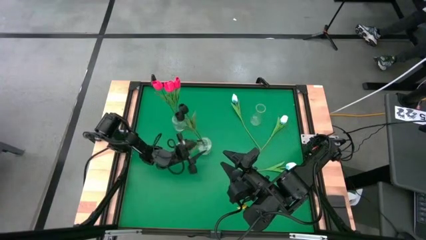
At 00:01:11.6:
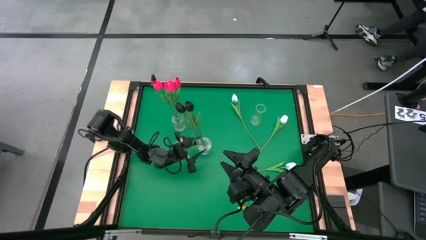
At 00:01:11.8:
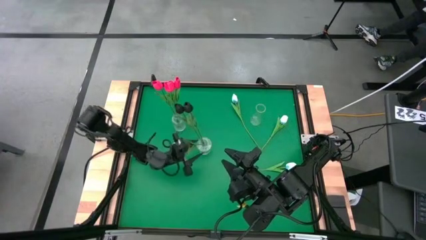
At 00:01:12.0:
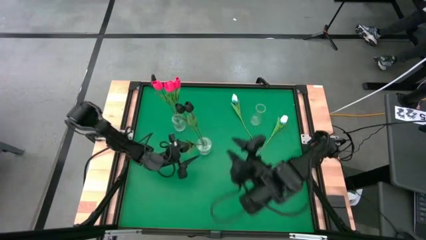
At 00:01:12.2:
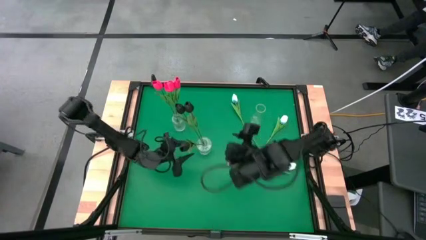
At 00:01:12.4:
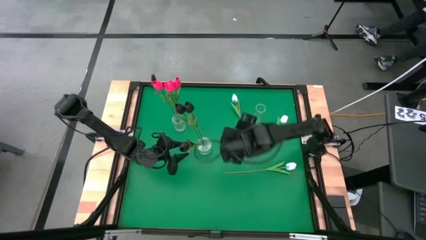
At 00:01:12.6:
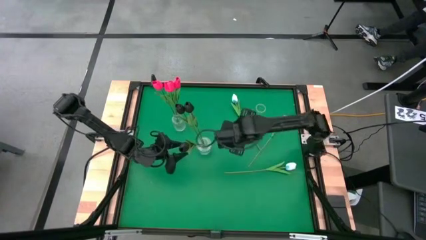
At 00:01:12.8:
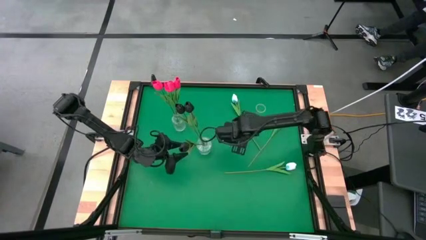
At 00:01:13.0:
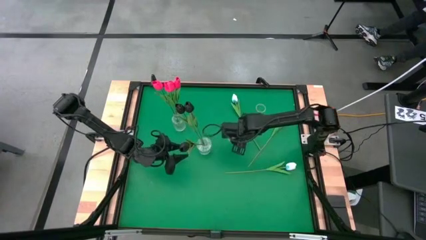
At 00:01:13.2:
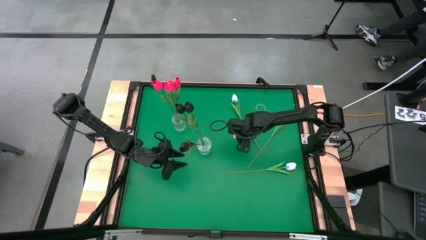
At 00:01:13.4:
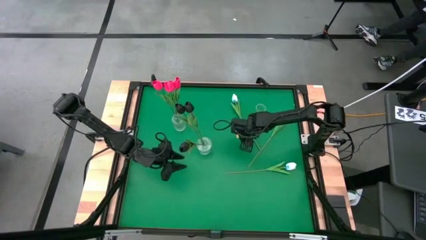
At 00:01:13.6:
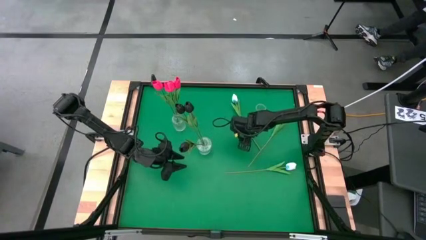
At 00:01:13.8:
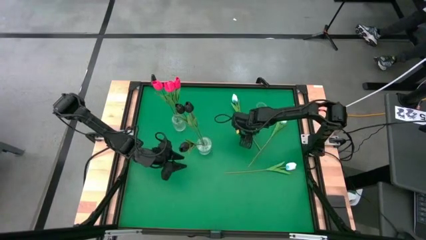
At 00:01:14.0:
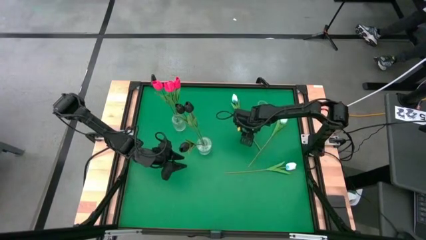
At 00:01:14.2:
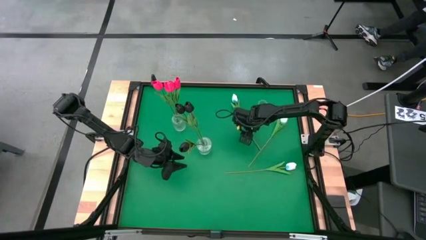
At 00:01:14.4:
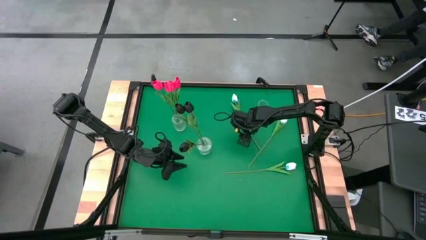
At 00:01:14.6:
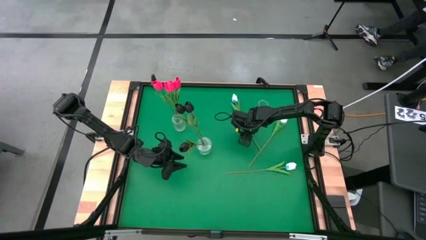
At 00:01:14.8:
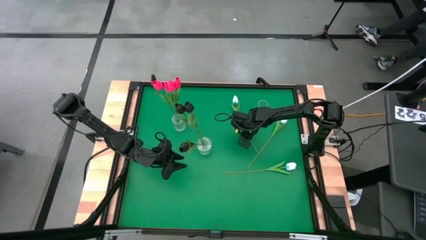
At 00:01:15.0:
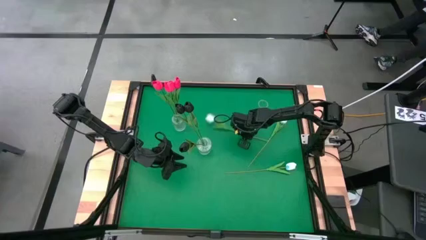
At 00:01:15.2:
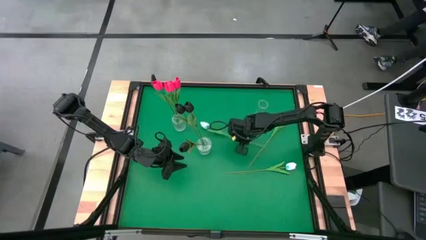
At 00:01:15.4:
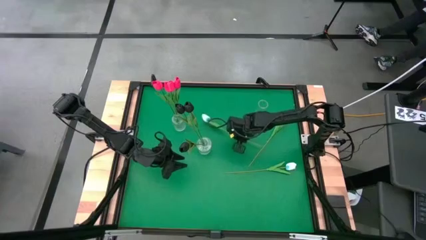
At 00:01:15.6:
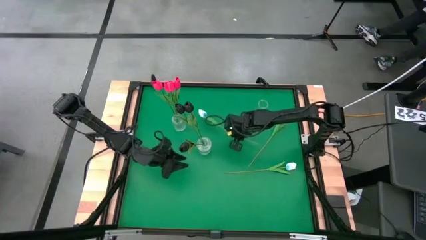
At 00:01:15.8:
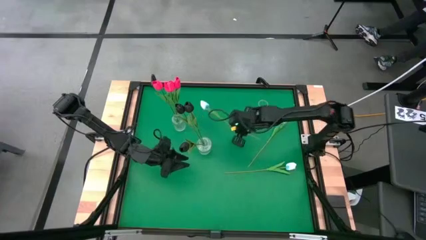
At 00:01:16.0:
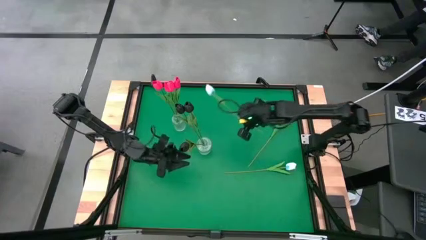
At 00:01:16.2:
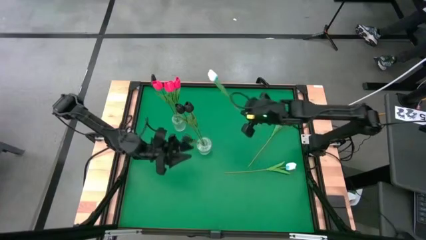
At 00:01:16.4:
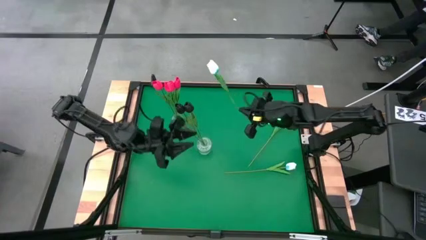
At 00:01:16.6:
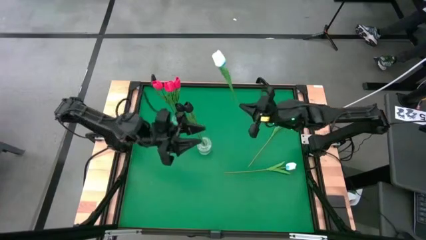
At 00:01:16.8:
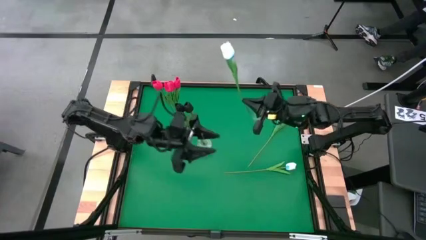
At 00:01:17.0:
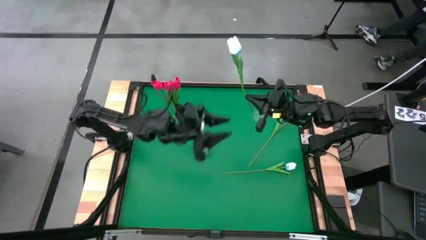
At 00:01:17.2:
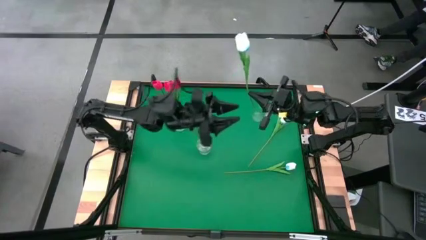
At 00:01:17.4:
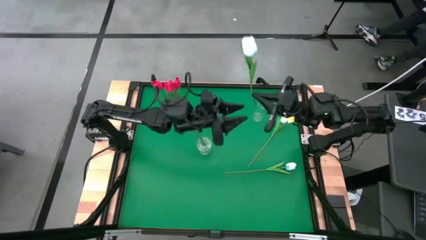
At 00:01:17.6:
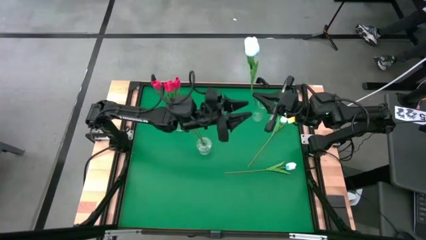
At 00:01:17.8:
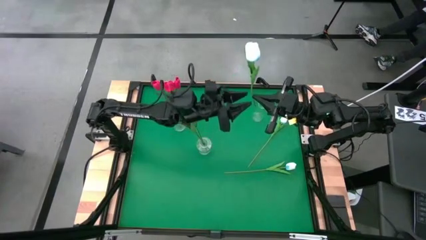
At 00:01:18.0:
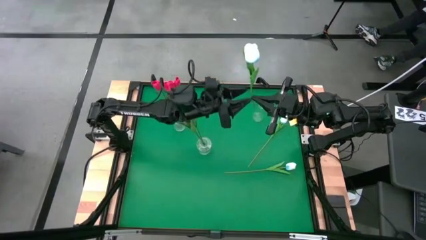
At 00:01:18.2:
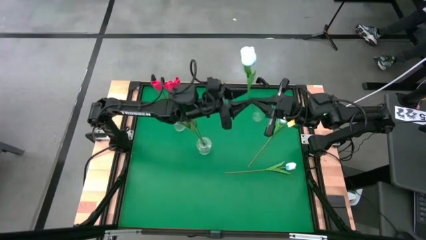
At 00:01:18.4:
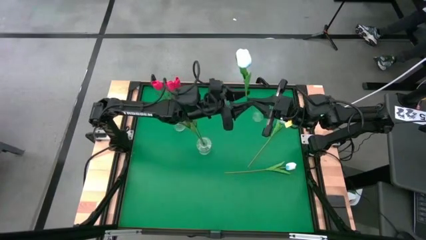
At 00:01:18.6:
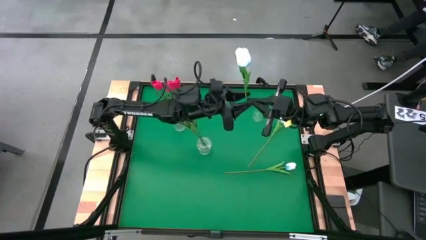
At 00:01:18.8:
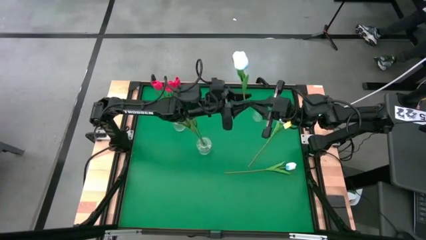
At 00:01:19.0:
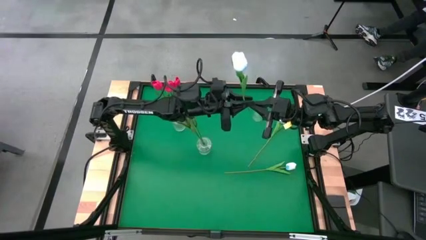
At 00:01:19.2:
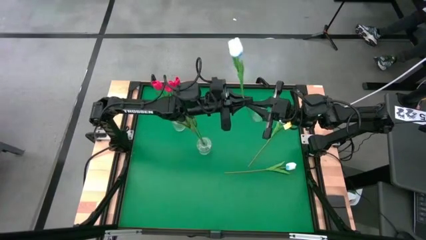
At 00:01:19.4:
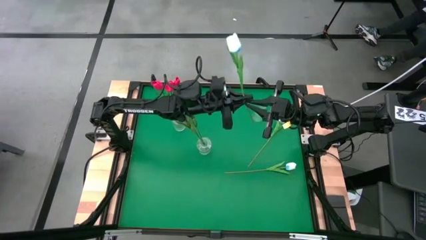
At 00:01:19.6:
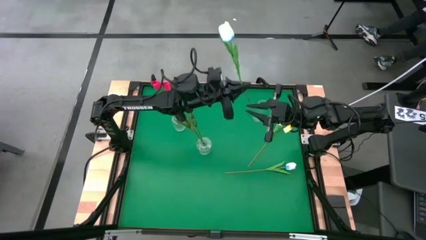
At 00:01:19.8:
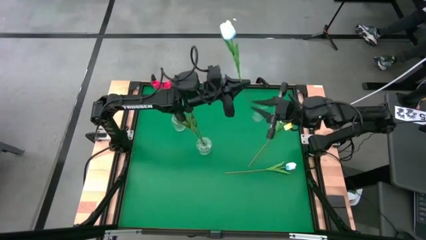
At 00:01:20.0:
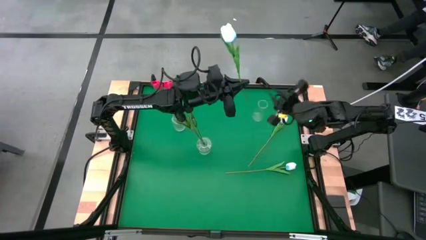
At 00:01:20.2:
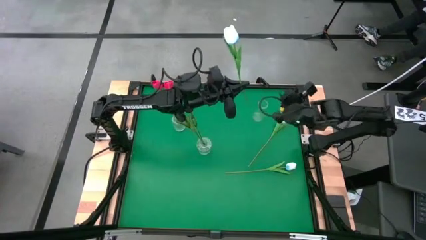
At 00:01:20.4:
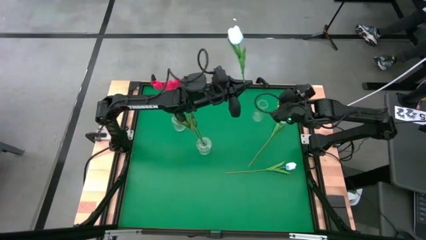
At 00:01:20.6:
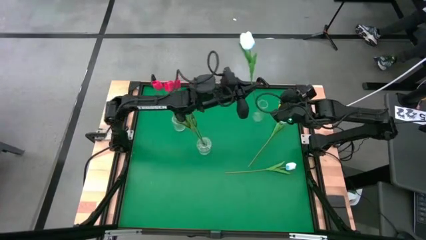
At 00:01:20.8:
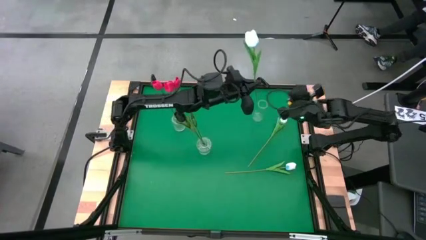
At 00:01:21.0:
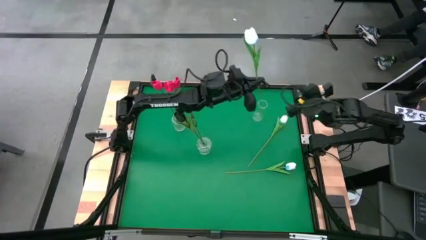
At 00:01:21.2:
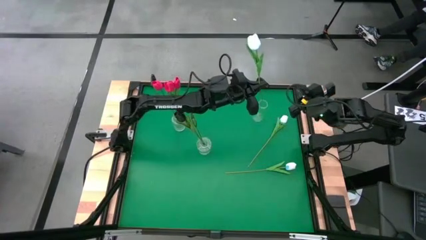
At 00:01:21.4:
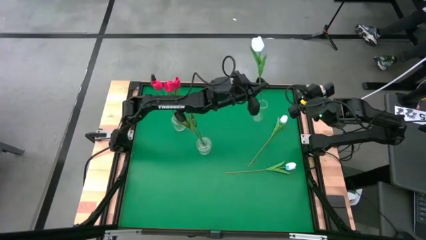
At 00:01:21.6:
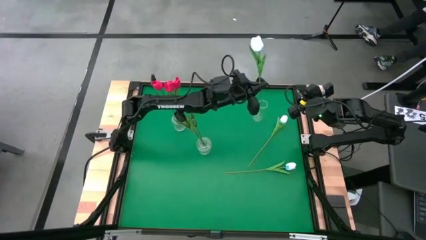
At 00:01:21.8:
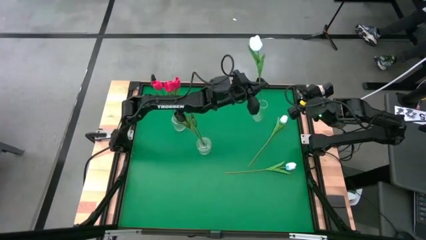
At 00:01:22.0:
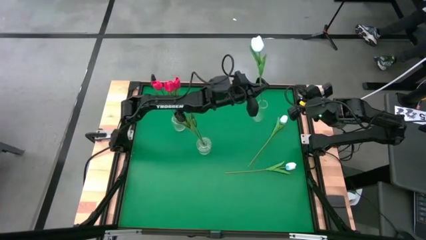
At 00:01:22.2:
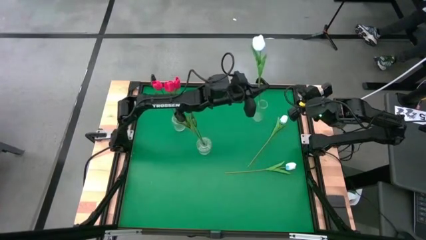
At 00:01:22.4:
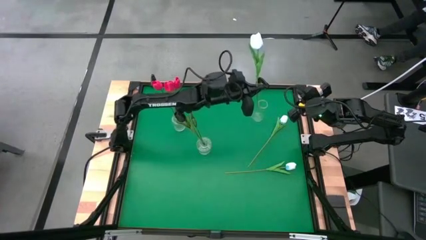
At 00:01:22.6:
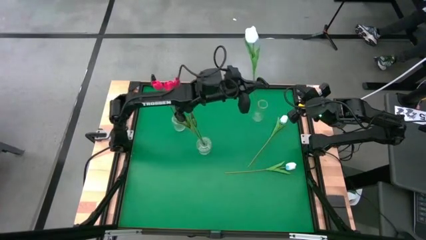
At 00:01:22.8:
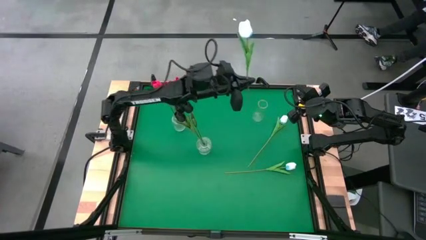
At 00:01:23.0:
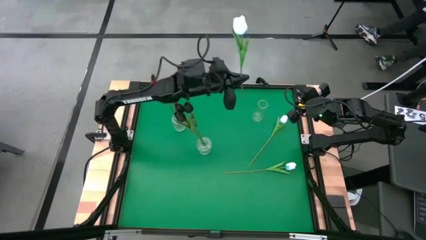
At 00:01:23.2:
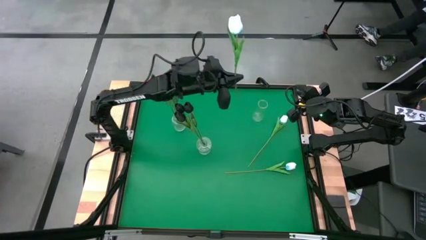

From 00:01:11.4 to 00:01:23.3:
Task: Sort flowers into vase by color
Put the top white tulip into the top right transparent vase
